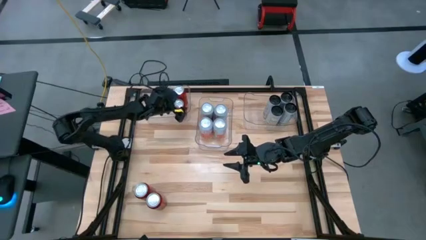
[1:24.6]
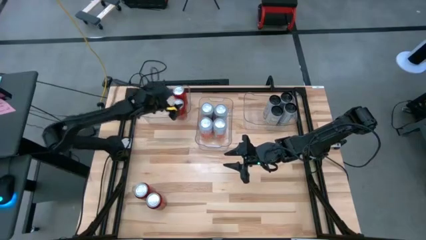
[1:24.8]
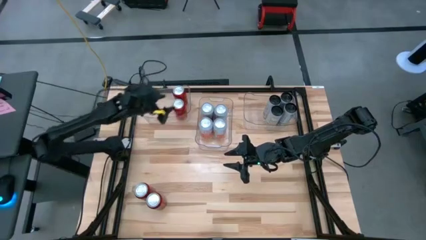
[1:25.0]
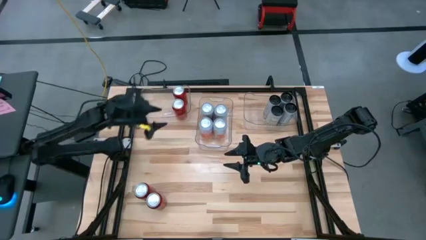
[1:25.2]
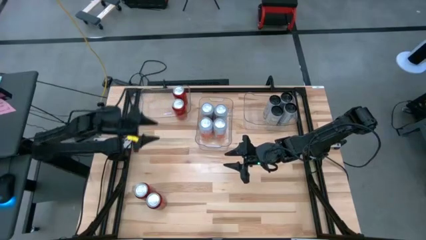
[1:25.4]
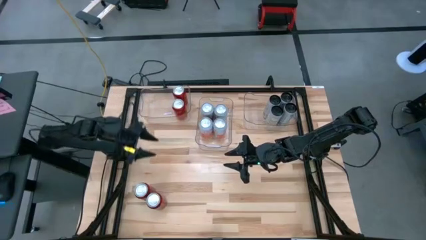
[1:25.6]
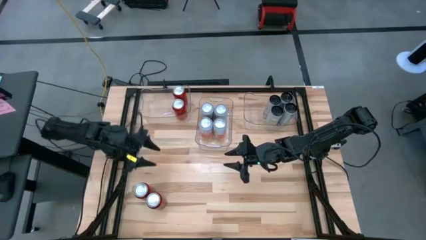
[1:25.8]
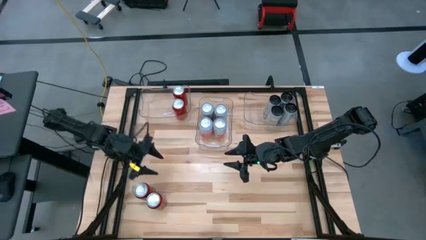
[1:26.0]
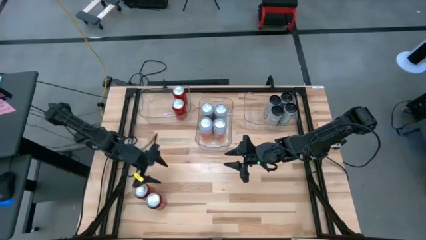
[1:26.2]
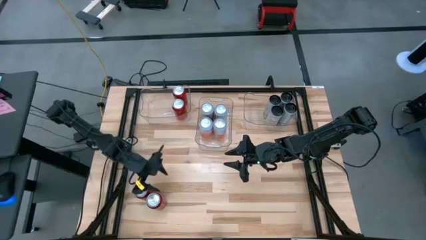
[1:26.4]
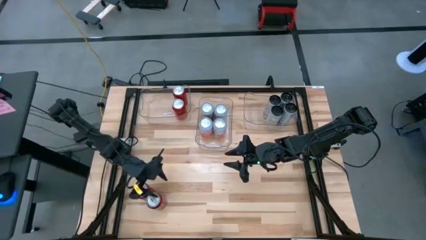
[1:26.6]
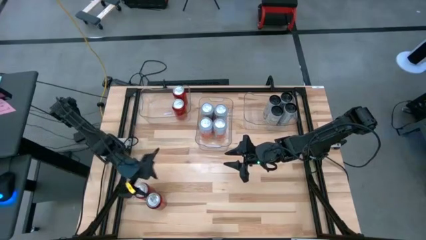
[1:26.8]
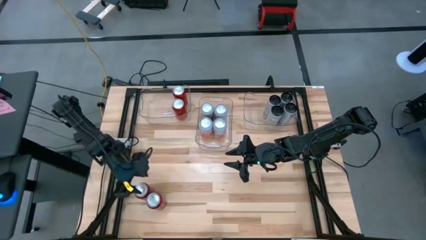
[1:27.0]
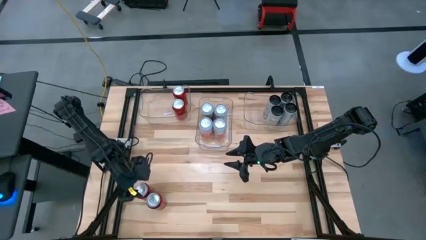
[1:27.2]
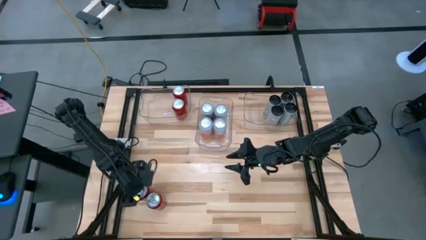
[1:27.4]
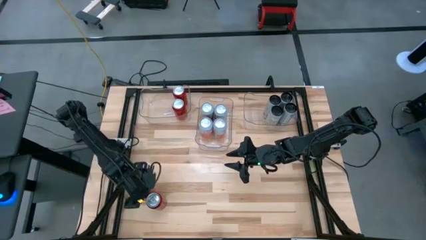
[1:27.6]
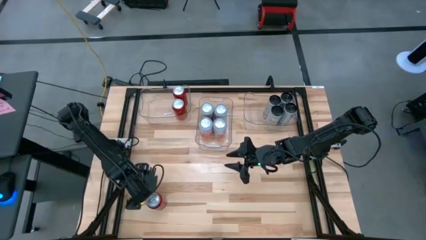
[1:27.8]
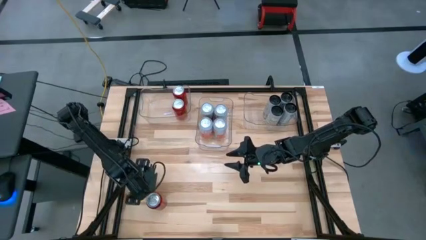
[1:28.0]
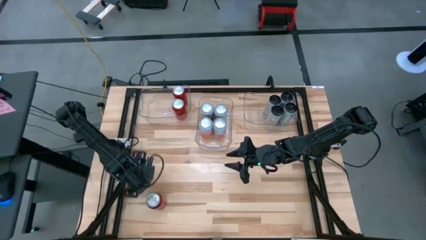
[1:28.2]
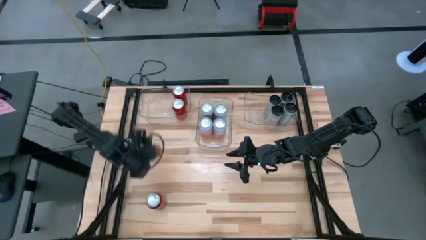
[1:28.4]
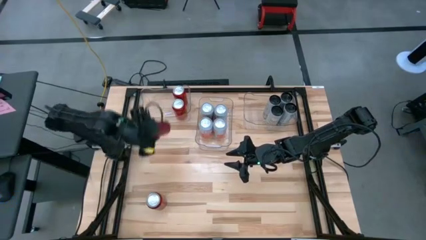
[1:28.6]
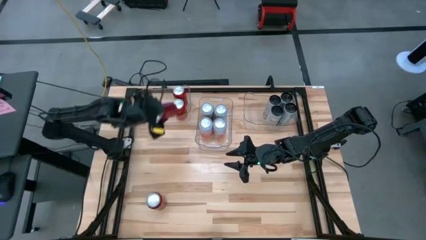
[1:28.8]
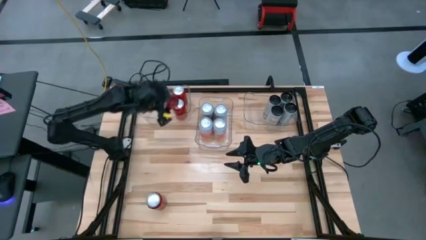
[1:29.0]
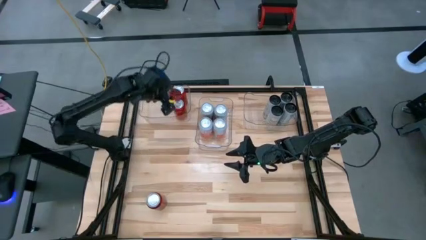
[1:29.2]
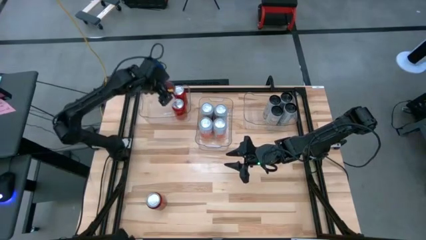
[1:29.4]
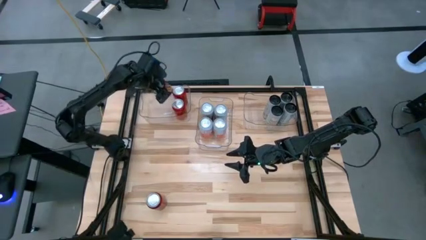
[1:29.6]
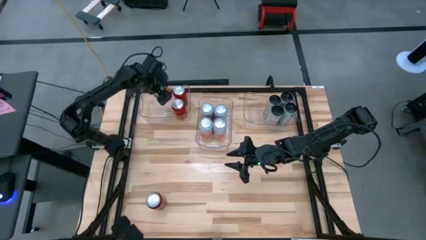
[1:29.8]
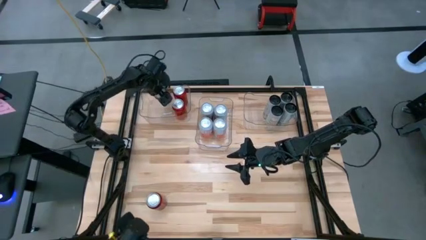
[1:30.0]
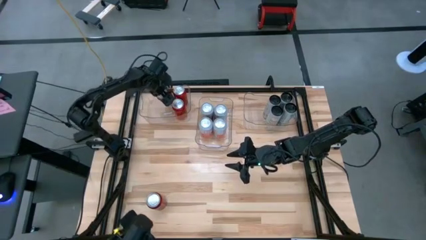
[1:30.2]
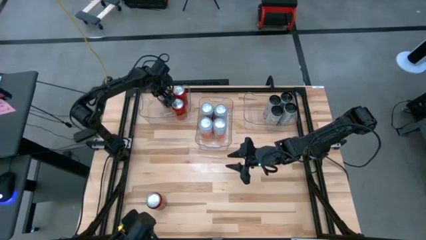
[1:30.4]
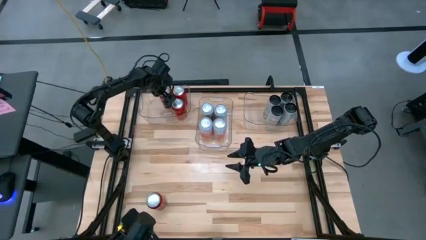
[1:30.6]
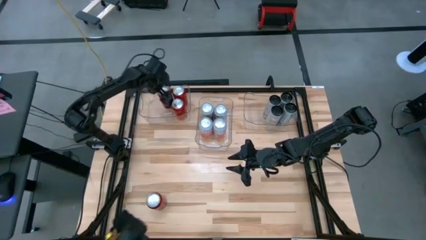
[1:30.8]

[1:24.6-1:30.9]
Task: Sort soda cans
Put the left red soda can in the left transparent bin

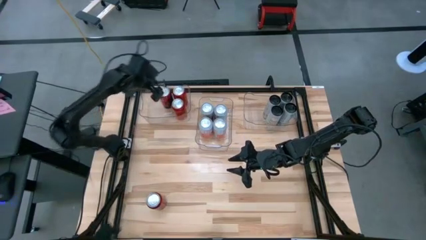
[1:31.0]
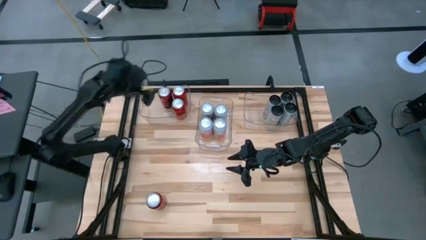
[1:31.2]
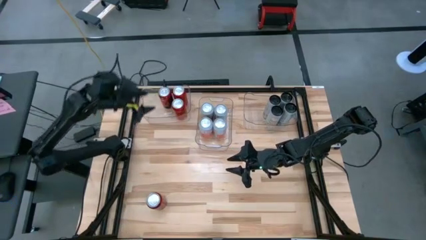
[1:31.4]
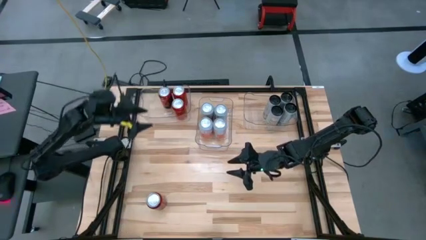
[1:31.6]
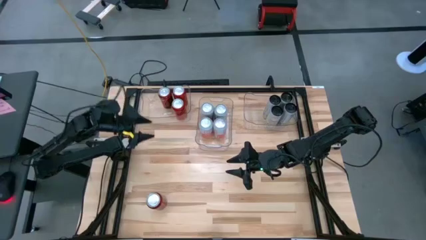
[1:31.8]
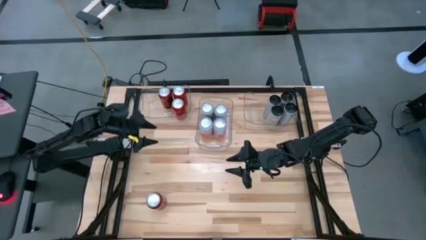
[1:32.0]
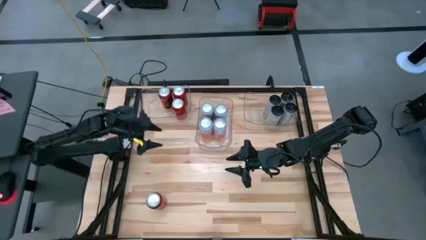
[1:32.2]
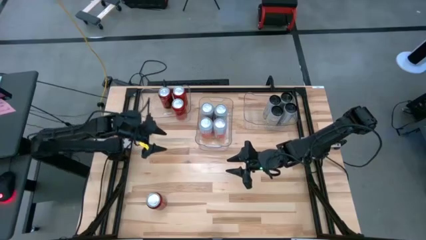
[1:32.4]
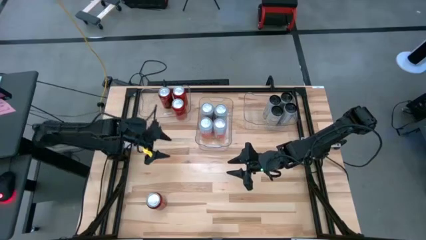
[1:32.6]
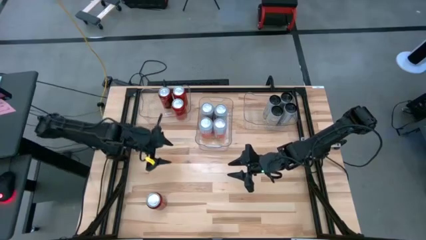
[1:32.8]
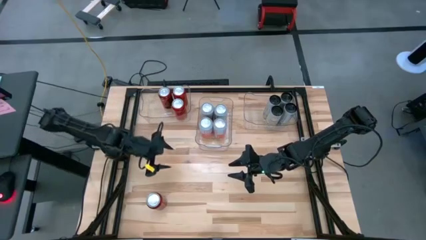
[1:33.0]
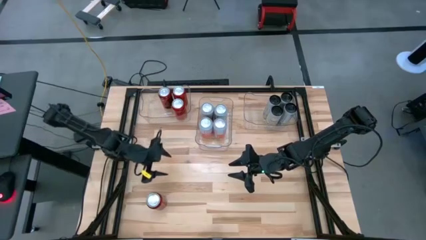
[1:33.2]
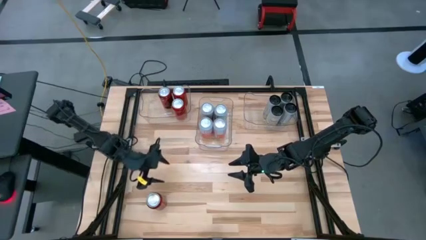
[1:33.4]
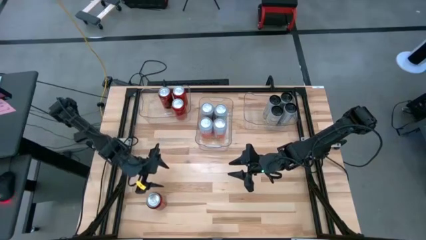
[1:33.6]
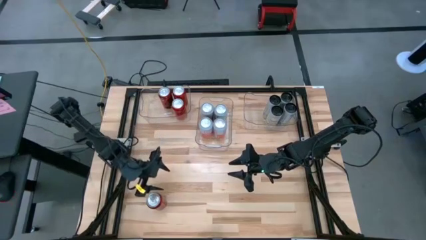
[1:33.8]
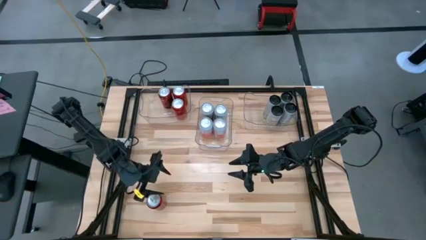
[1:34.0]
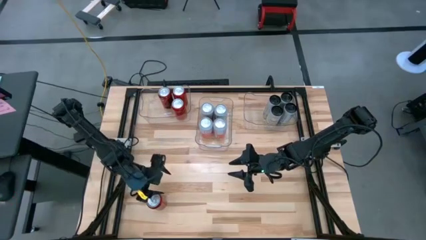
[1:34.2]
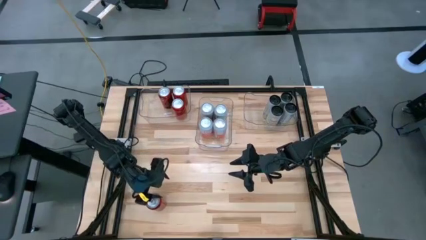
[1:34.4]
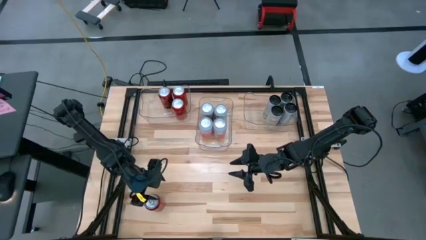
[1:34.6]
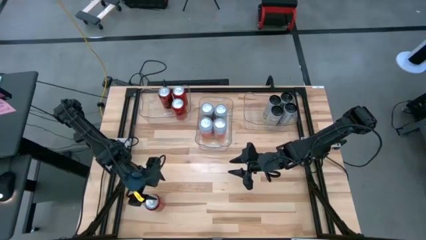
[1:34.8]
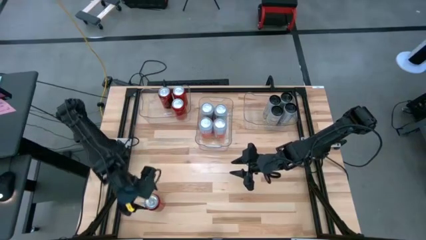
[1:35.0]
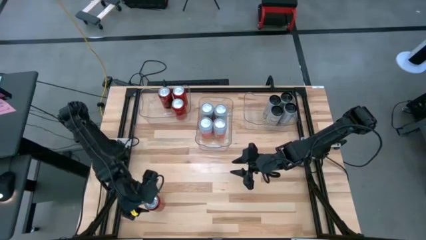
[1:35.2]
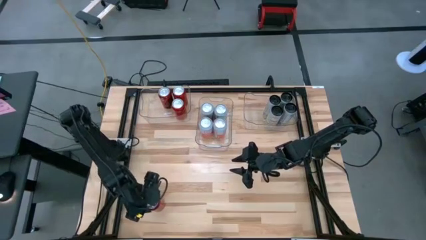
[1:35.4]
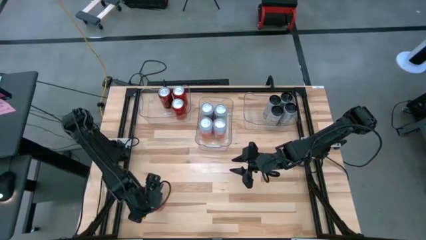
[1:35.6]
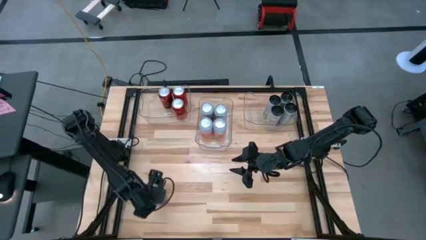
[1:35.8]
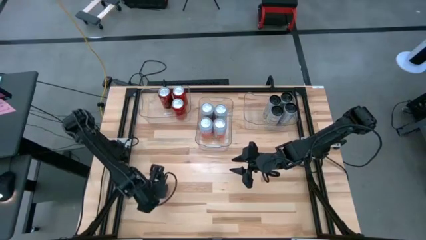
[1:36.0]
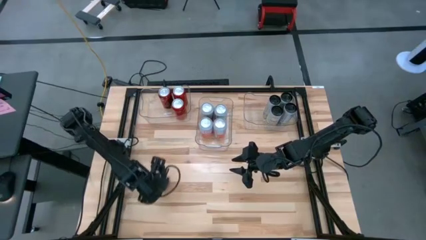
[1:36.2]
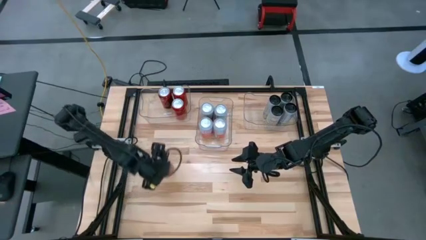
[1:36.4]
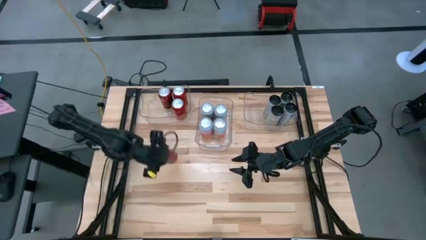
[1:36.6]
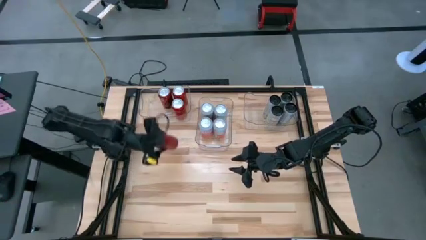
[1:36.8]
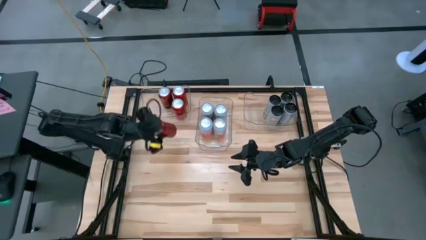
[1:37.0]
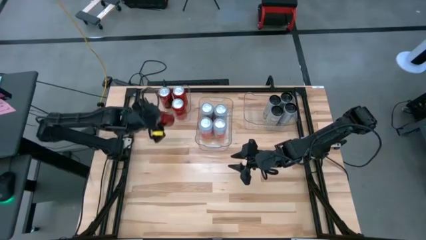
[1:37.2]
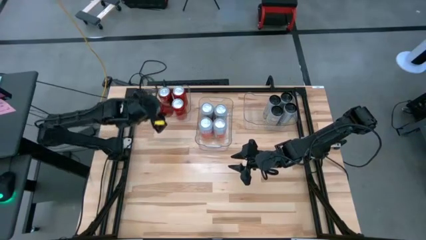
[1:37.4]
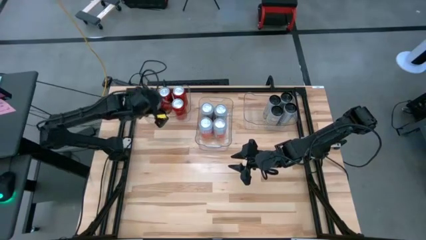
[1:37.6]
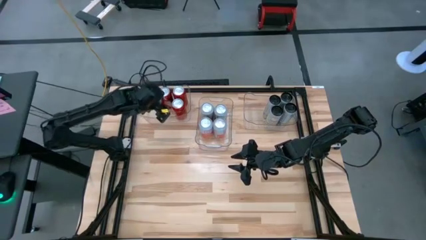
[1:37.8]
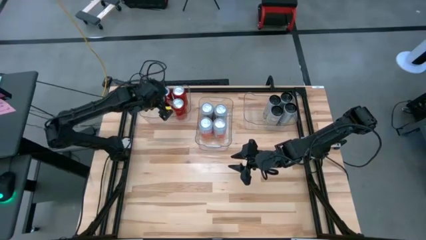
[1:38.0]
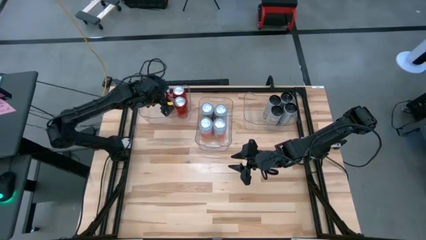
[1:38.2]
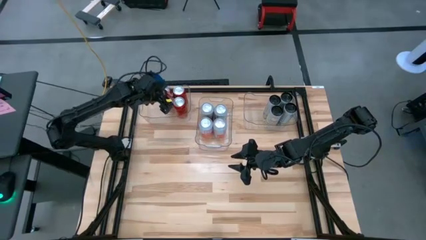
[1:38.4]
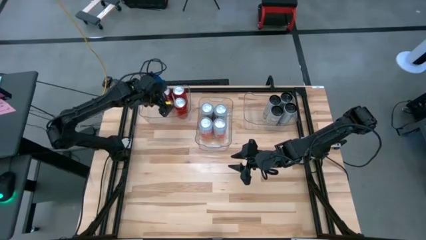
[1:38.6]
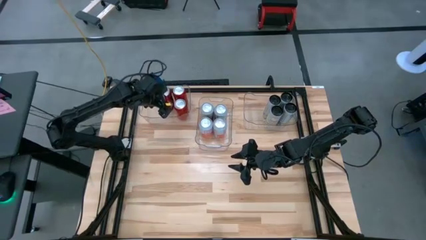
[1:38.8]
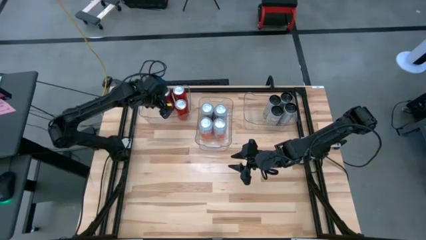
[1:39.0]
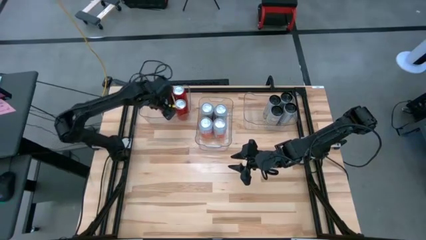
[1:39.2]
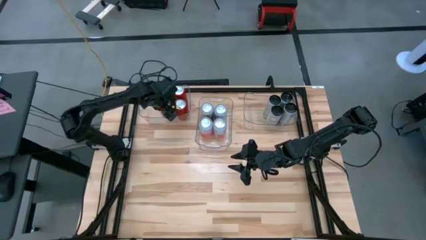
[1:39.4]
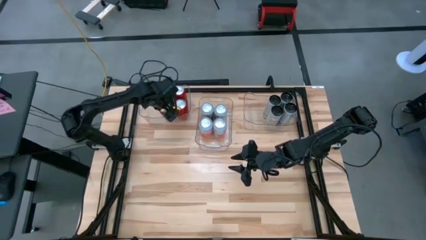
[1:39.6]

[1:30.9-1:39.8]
Put the red soda can in the left transparent bin

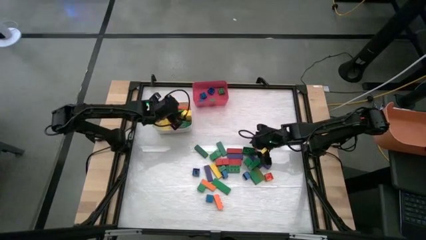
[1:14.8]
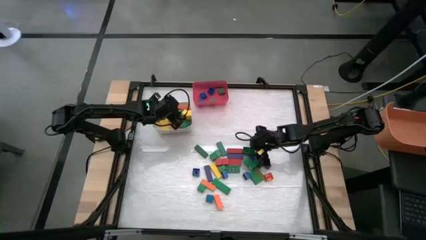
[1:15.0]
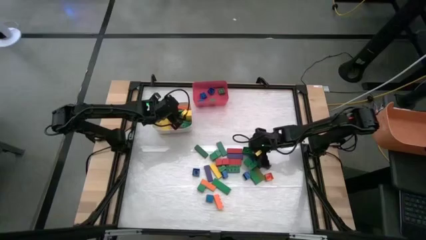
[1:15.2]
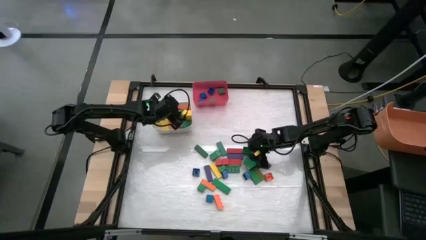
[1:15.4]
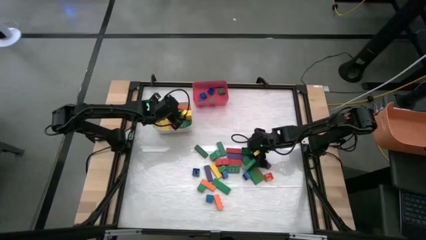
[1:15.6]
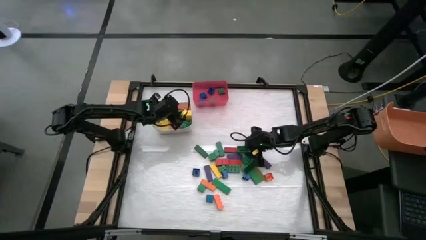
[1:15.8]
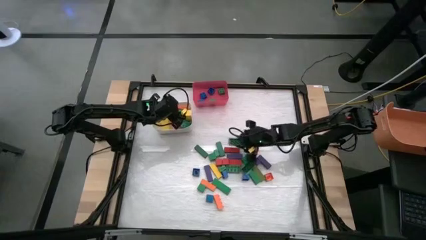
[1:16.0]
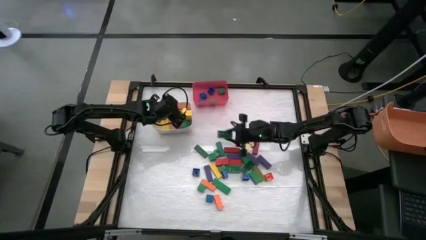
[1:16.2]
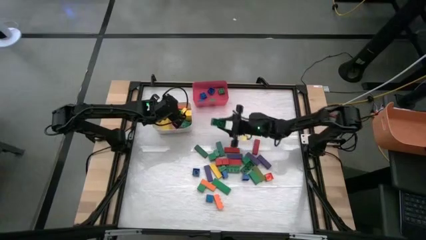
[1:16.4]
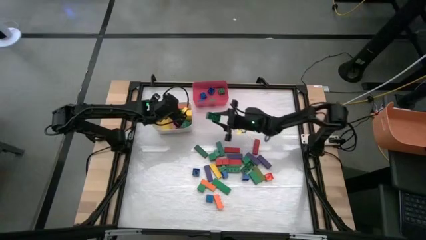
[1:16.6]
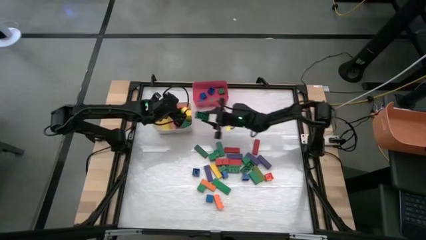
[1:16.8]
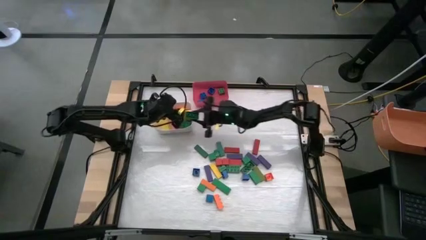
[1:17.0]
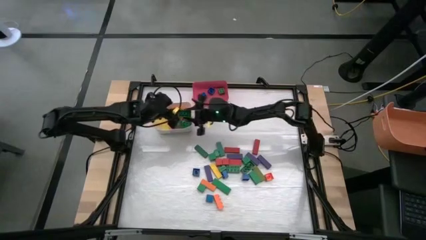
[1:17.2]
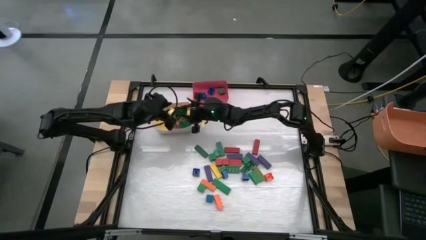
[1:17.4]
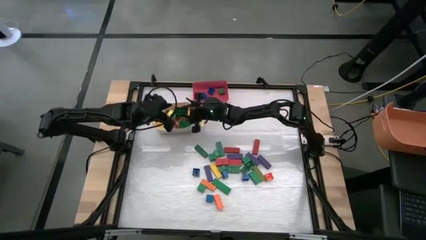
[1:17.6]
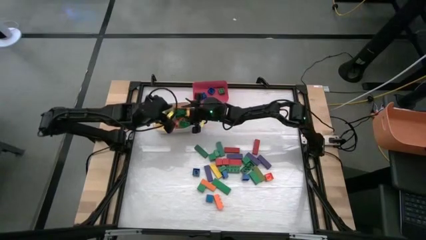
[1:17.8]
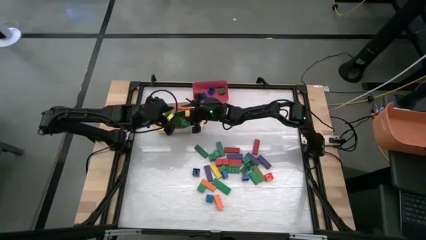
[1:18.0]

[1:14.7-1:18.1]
Task: Sort blocks by size
Put the large green game piece into the white bin
